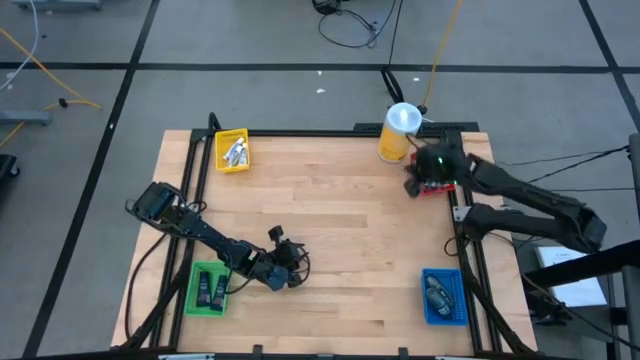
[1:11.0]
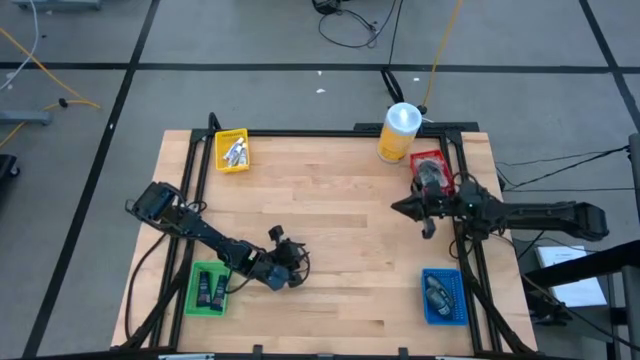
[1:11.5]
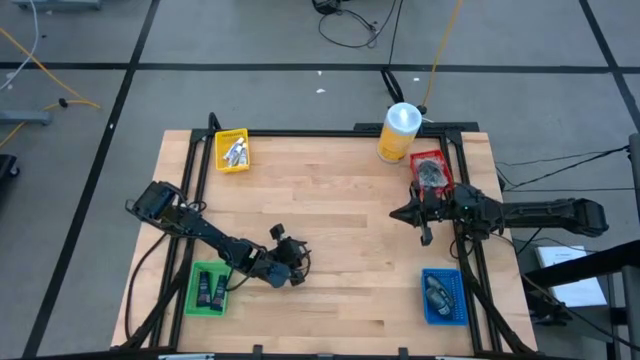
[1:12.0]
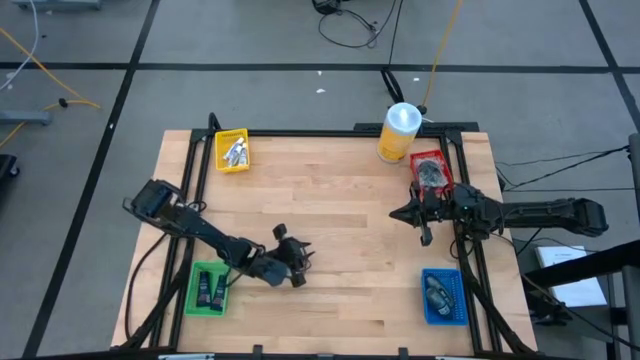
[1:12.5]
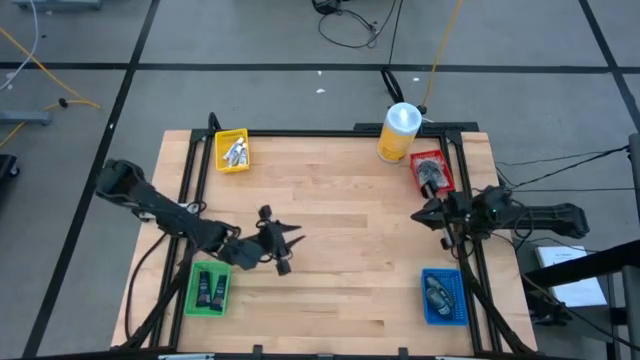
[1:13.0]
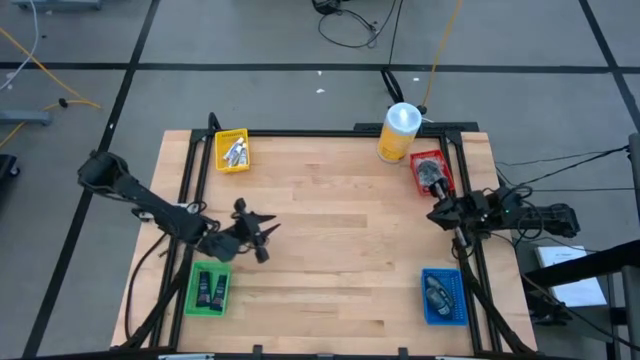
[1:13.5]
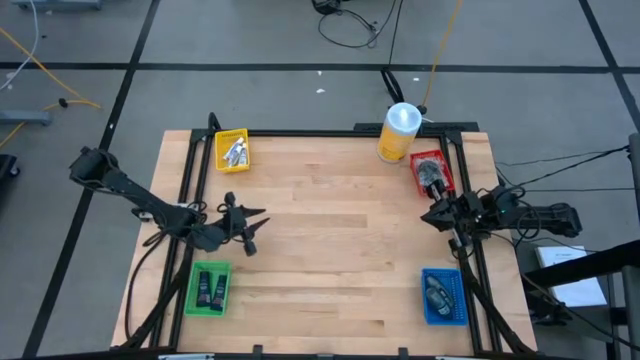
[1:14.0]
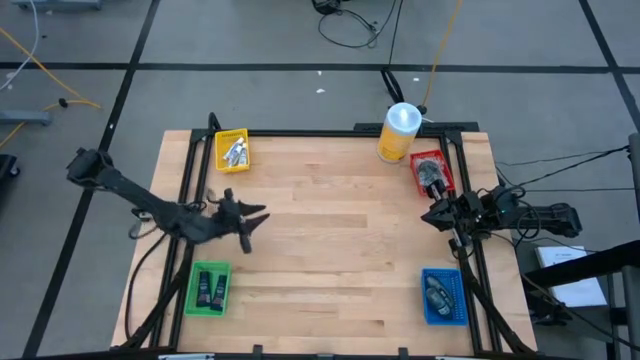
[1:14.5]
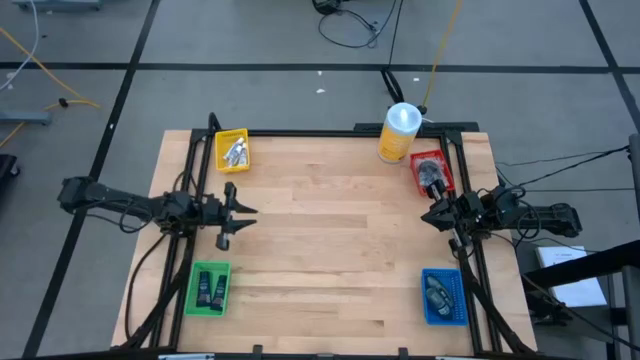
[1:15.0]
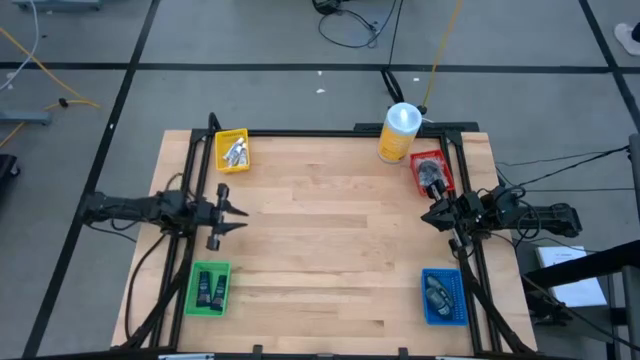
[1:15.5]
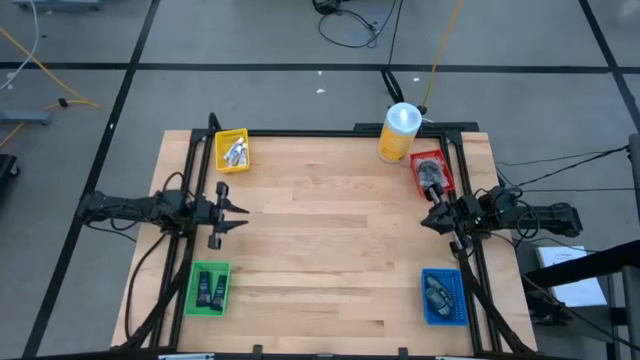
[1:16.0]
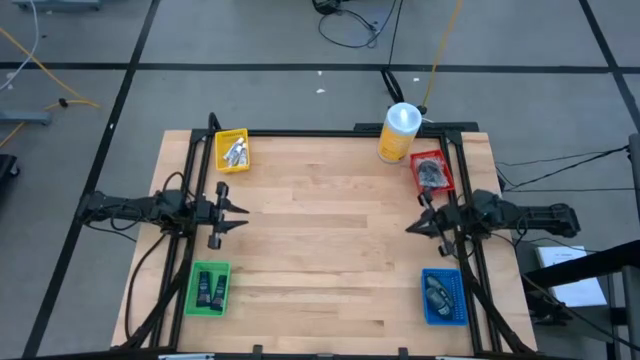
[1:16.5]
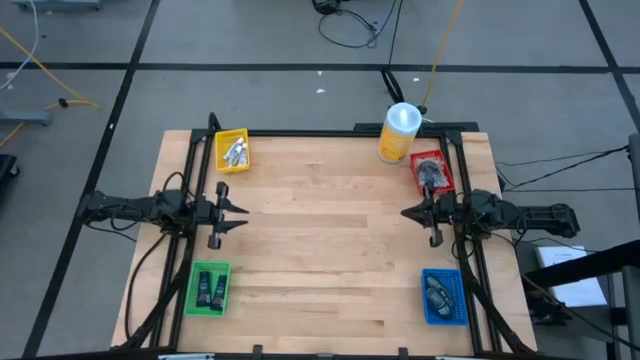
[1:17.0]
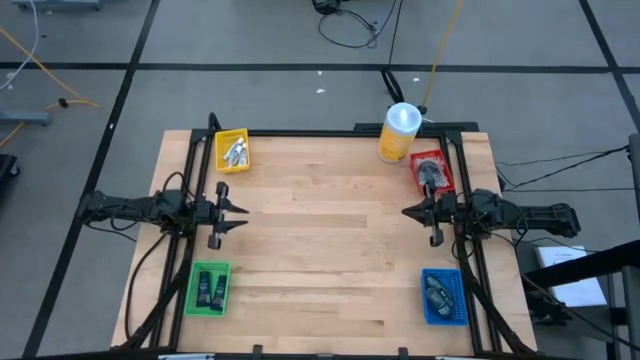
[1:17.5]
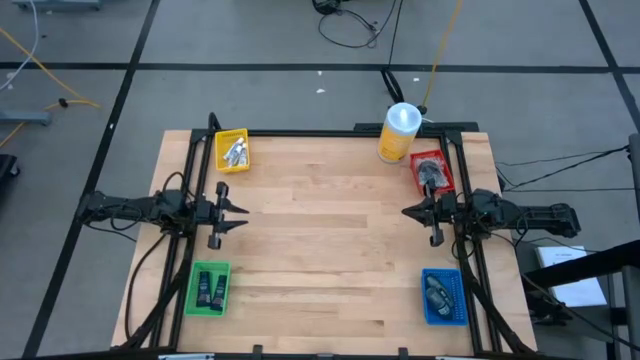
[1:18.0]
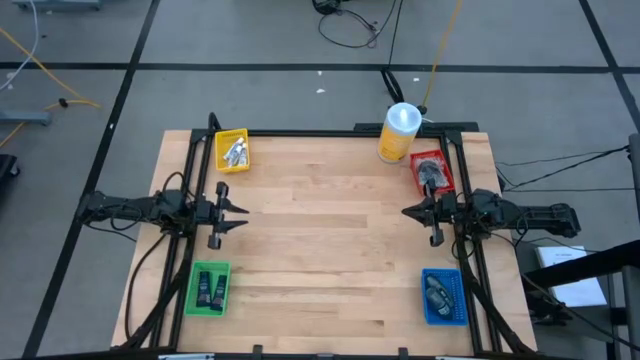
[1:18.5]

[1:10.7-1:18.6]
Task: Pick & Place Travel size toiletries
Return to Home Position

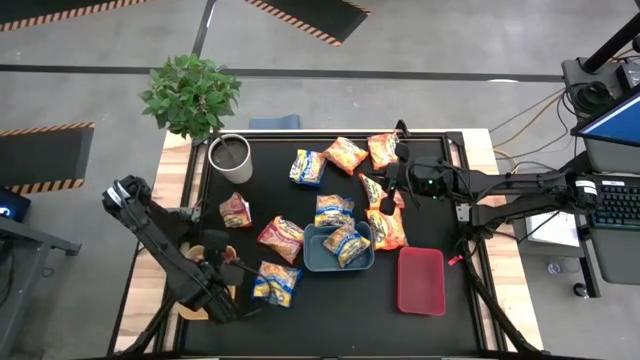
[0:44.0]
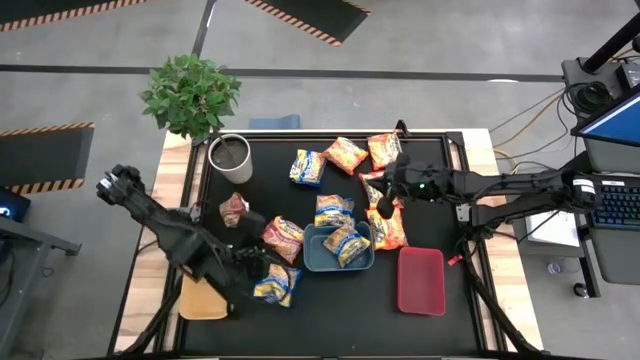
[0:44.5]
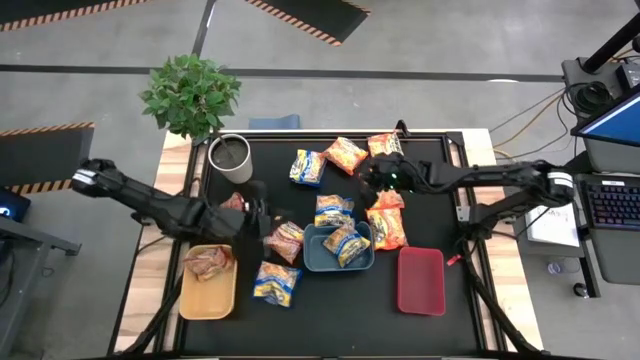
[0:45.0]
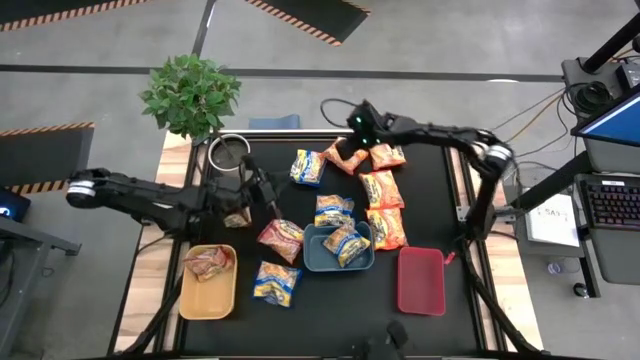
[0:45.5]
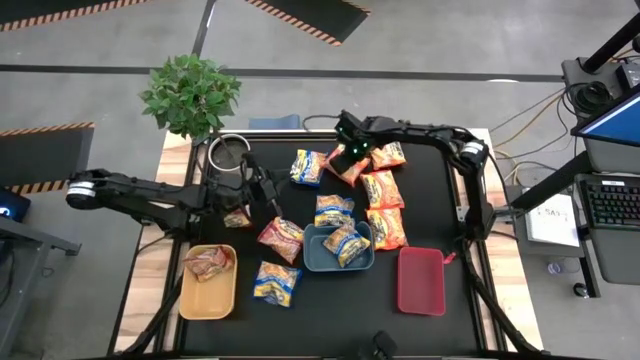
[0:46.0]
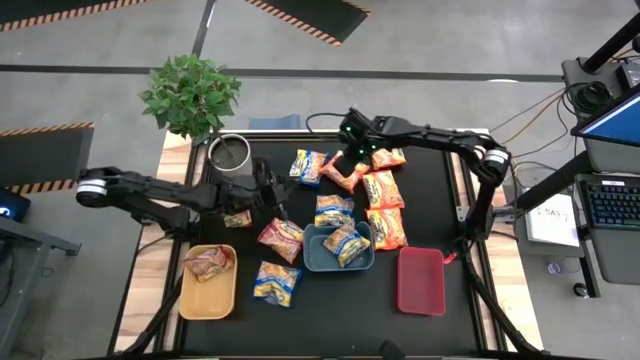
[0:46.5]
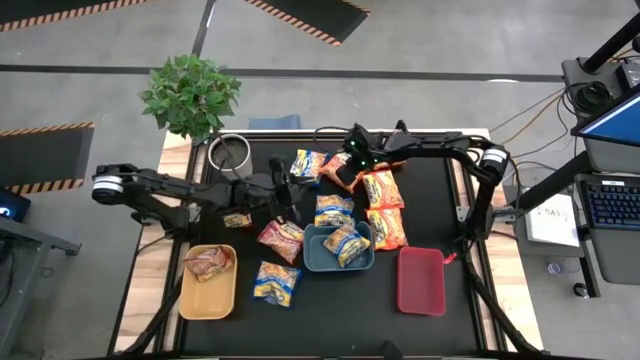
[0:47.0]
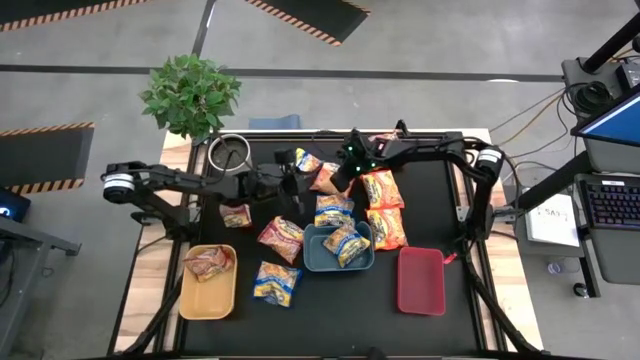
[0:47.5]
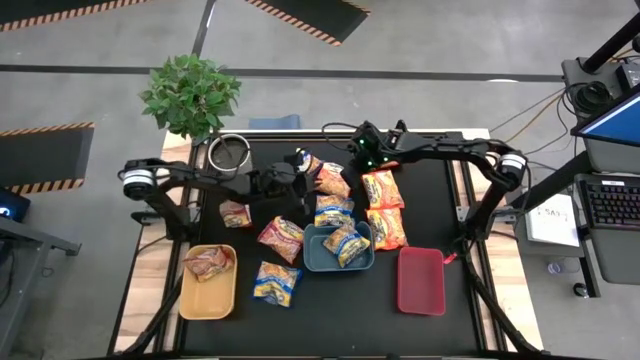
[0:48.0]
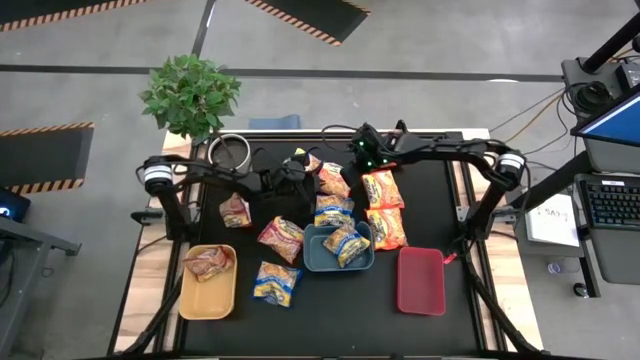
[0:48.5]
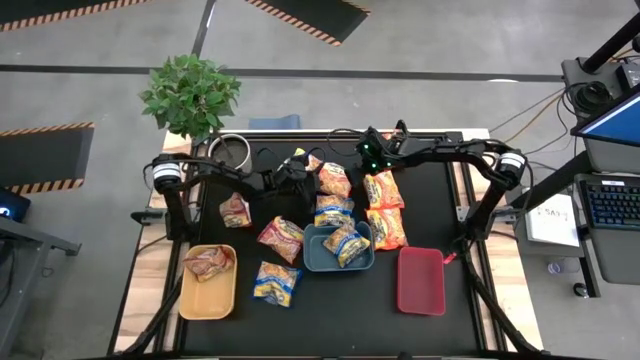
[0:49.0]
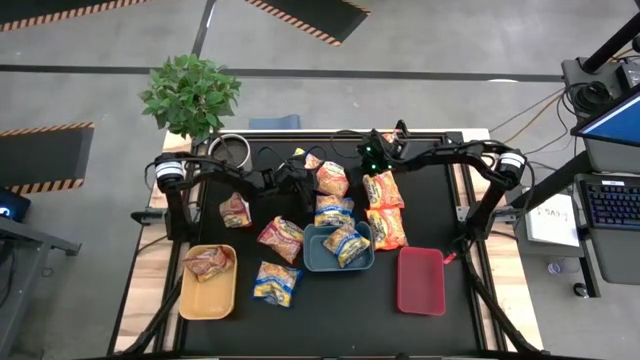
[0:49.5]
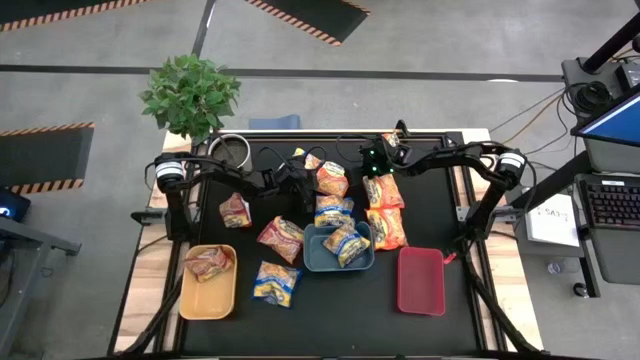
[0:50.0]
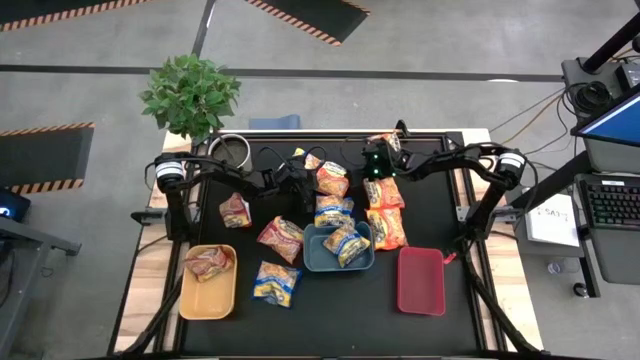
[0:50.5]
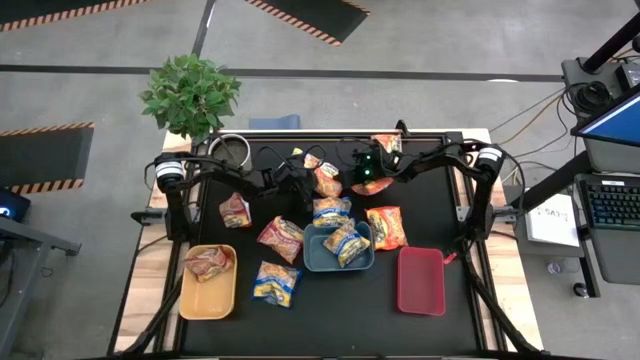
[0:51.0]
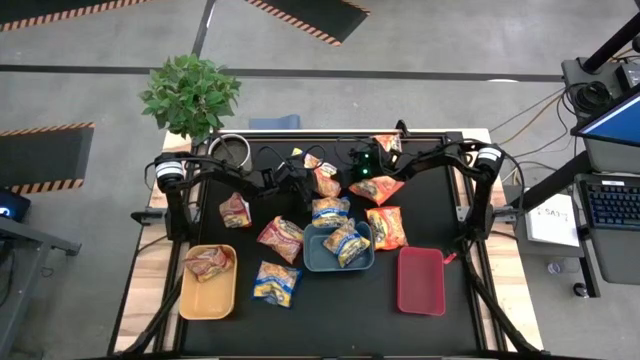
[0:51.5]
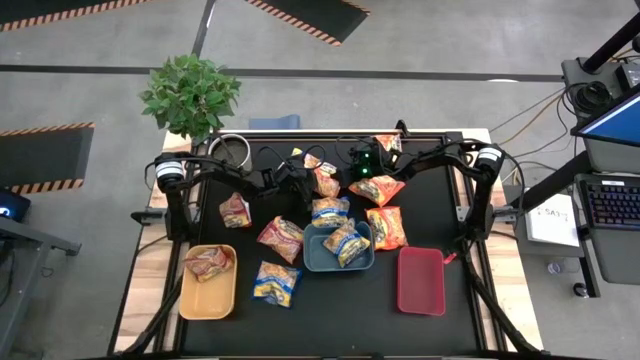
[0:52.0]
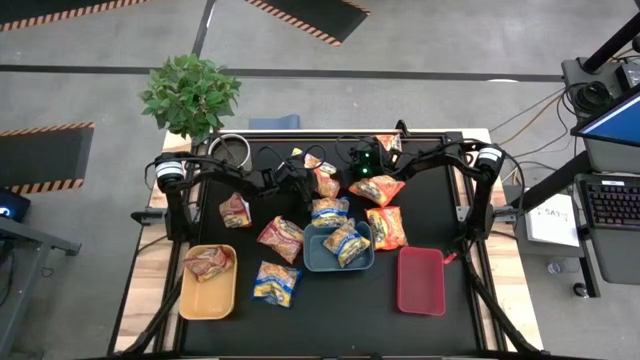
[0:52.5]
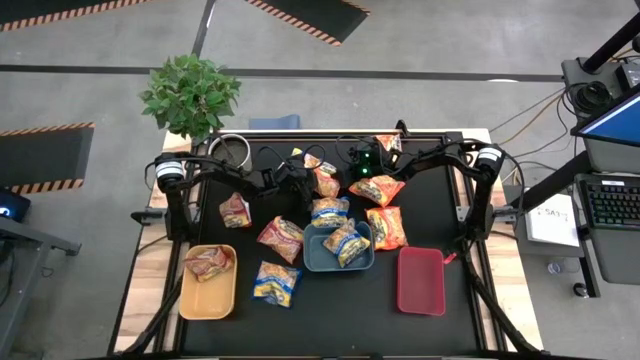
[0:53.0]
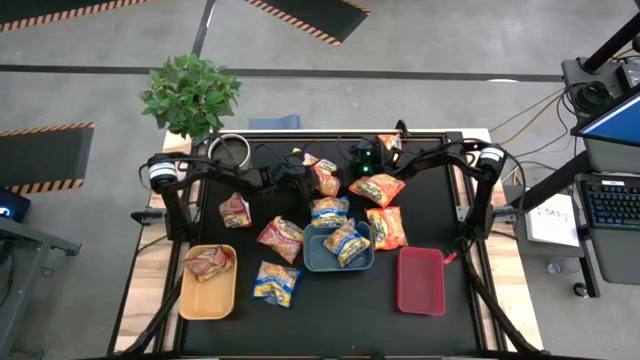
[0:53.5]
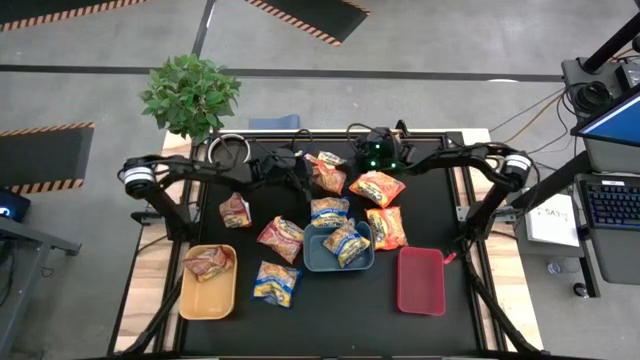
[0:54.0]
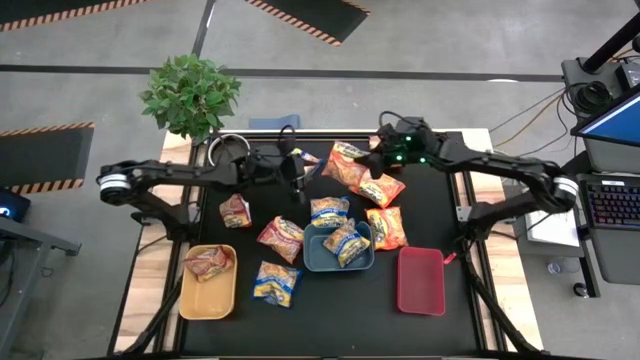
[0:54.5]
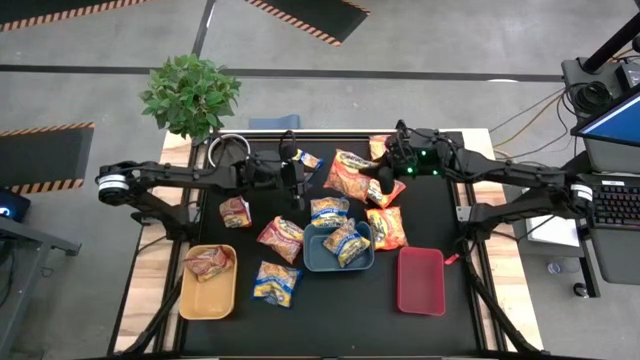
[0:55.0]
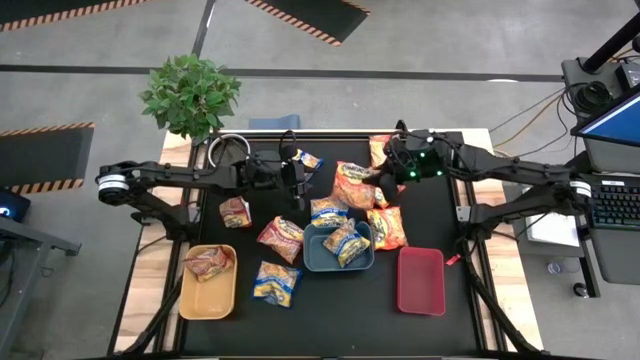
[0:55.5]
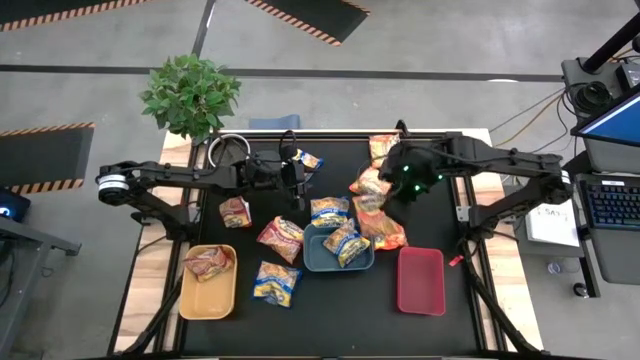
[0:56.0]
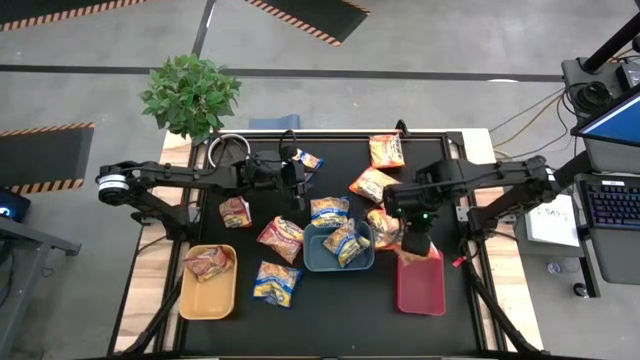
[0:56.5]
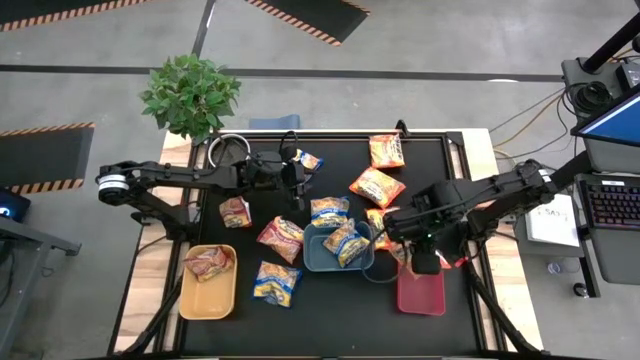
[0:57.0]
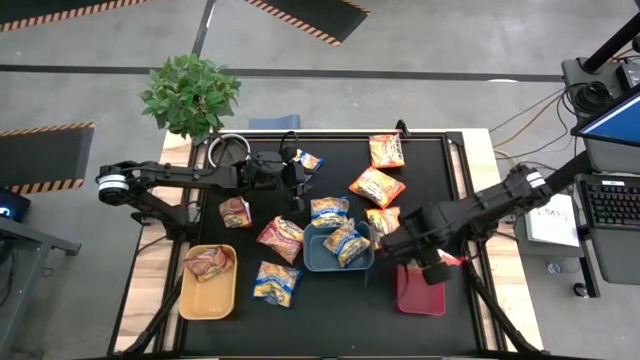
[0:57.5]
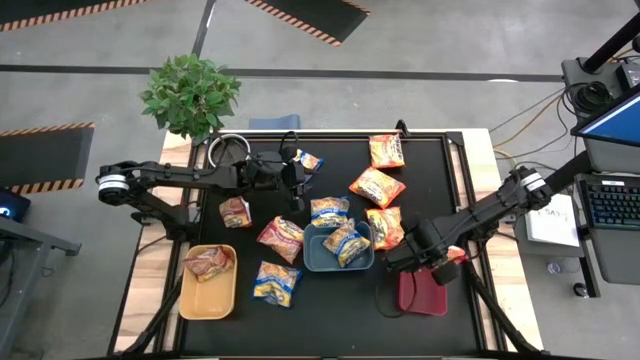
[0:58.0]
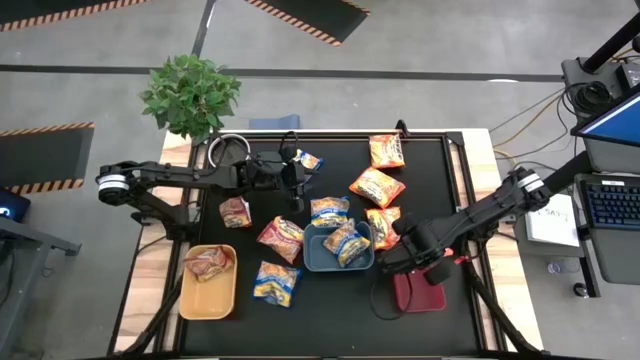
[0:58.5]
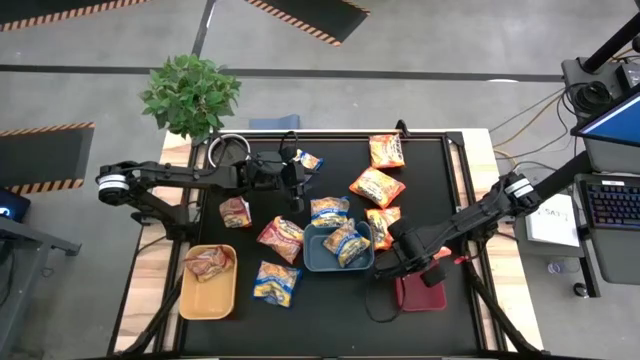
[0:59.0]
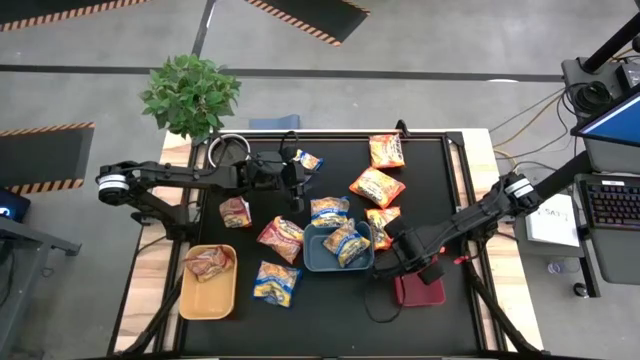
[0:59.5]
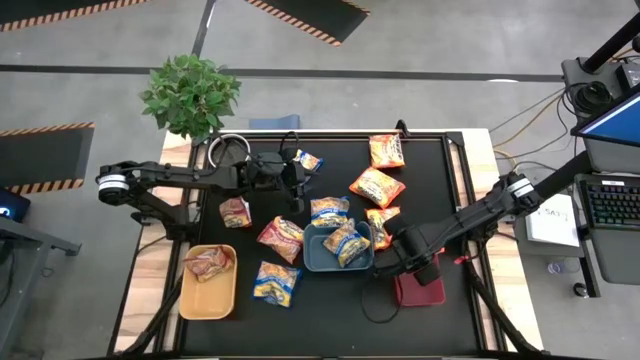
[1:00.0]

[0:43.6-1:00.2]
Task: Sort Maruchan noodles
Put the top left orange noodle pack into the red bin
